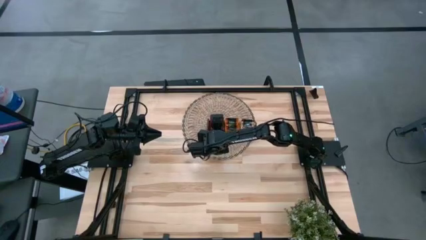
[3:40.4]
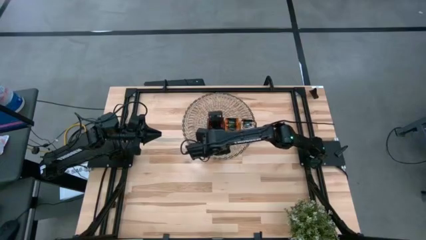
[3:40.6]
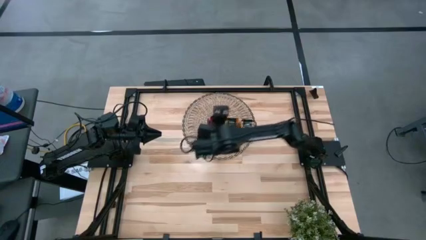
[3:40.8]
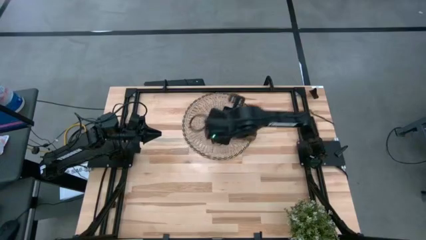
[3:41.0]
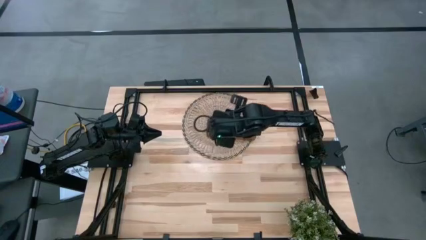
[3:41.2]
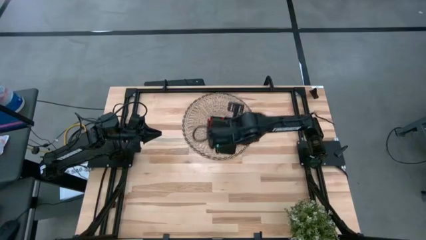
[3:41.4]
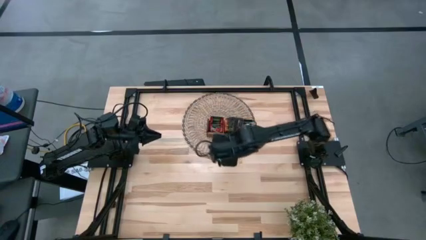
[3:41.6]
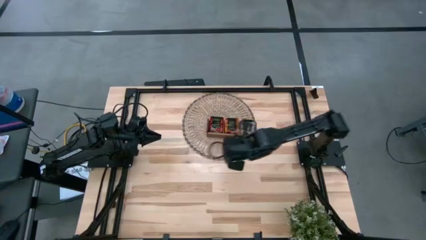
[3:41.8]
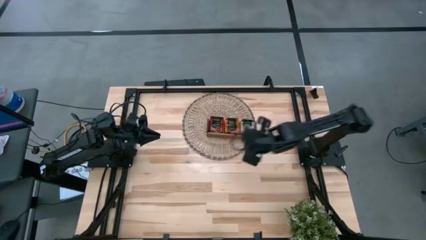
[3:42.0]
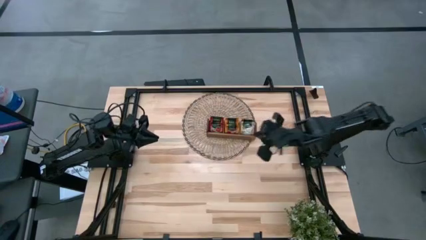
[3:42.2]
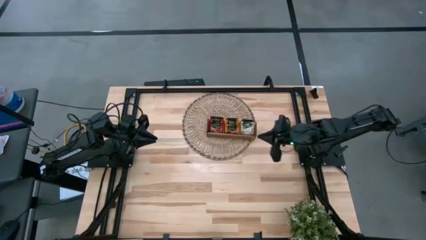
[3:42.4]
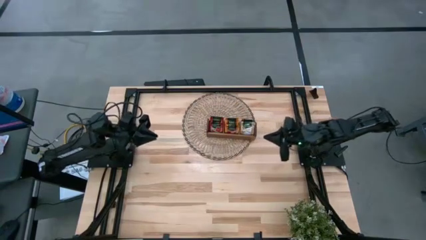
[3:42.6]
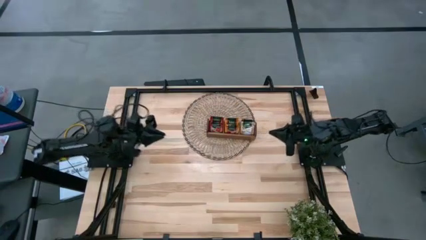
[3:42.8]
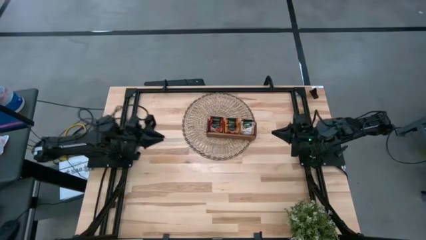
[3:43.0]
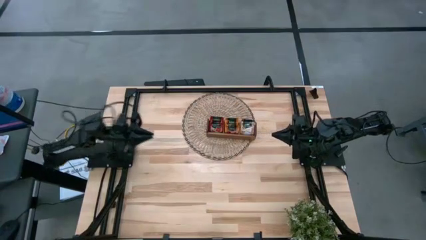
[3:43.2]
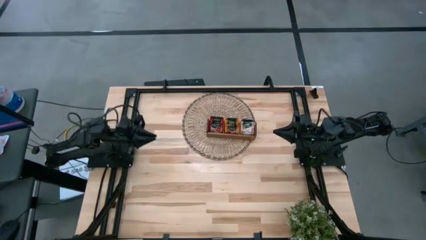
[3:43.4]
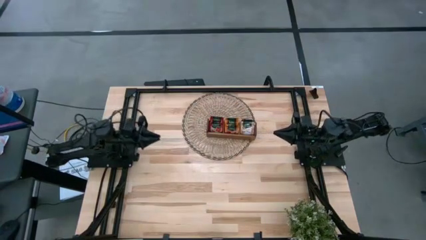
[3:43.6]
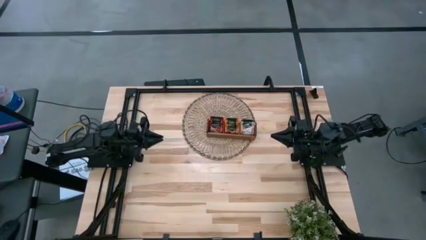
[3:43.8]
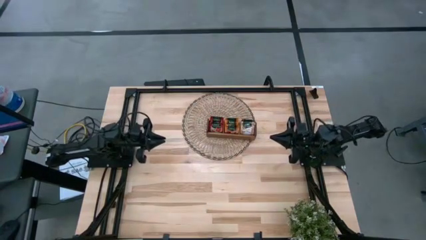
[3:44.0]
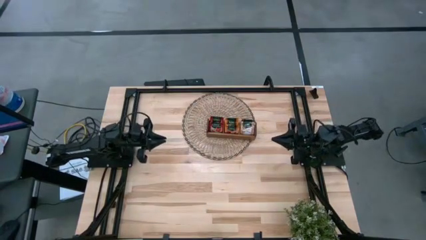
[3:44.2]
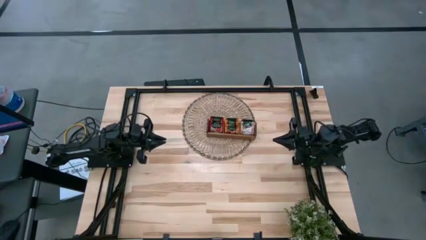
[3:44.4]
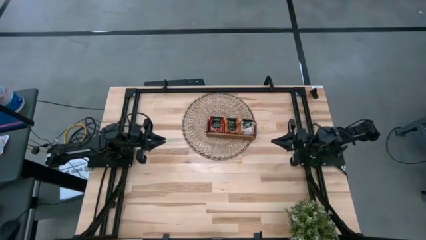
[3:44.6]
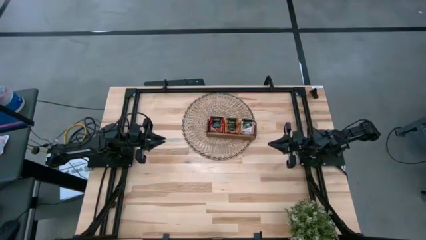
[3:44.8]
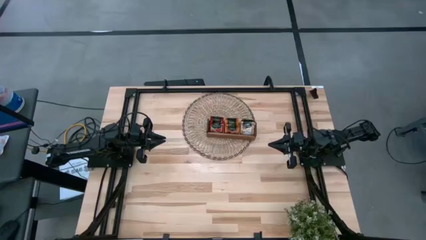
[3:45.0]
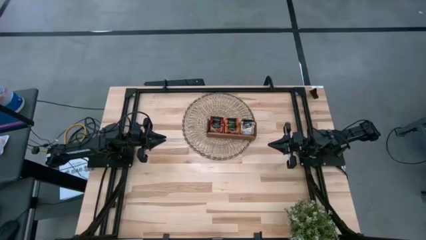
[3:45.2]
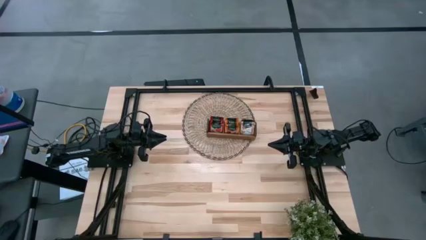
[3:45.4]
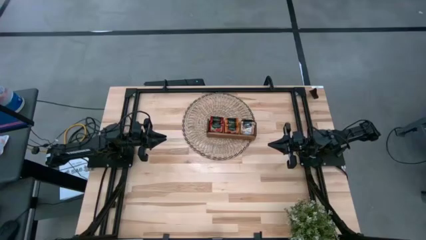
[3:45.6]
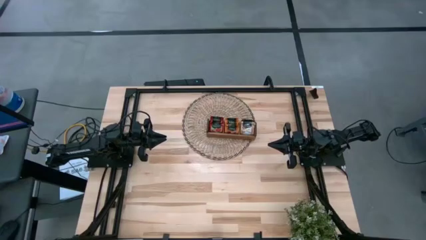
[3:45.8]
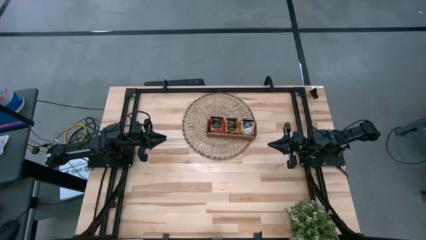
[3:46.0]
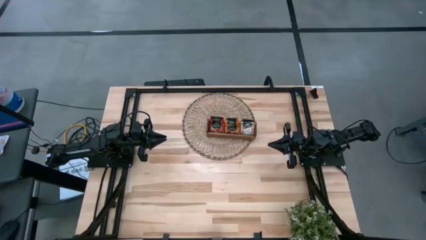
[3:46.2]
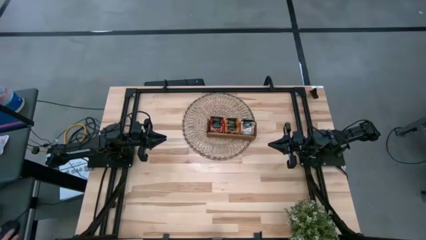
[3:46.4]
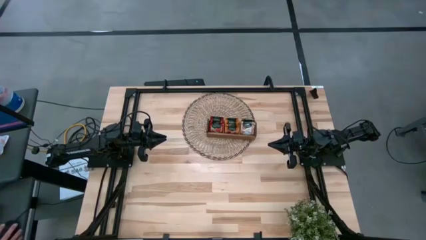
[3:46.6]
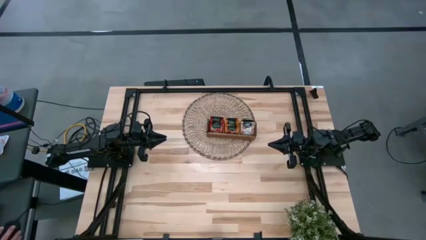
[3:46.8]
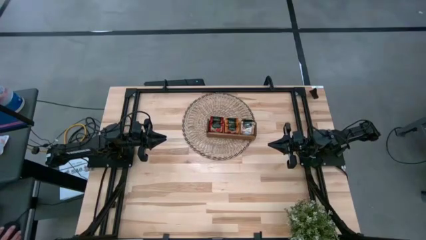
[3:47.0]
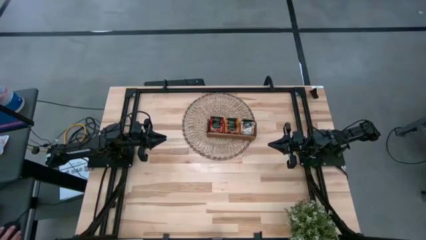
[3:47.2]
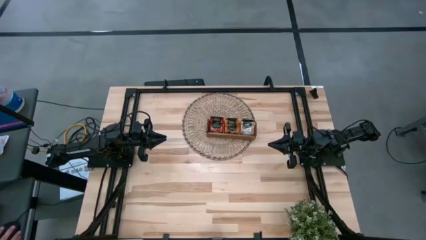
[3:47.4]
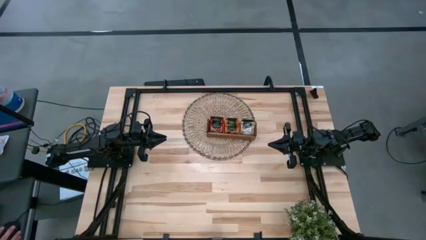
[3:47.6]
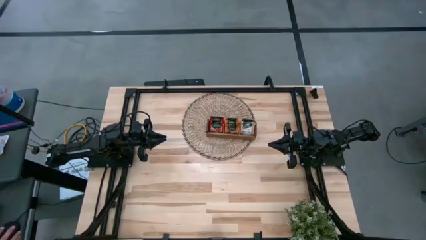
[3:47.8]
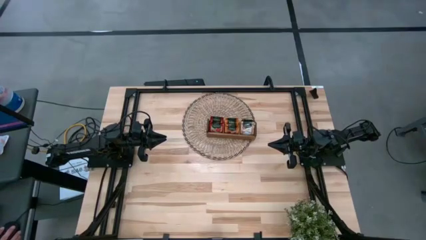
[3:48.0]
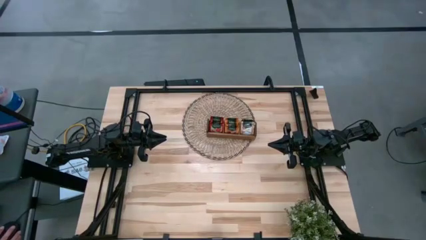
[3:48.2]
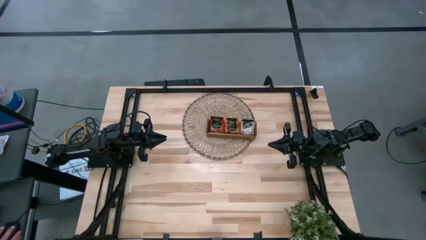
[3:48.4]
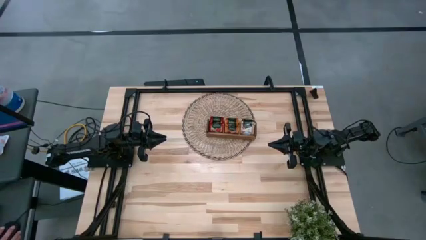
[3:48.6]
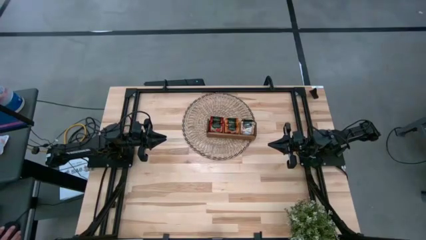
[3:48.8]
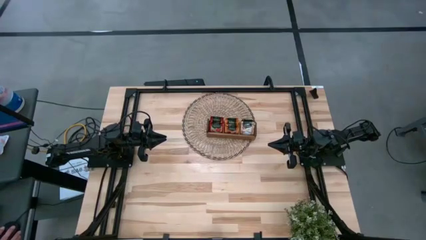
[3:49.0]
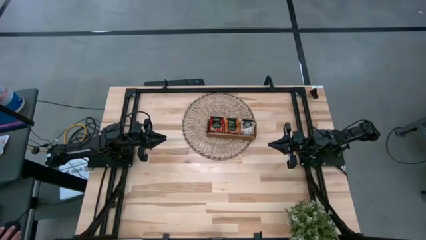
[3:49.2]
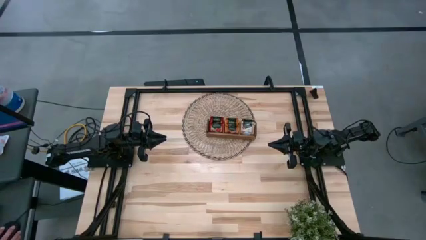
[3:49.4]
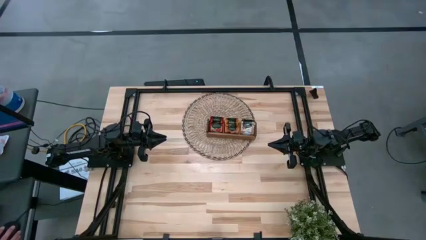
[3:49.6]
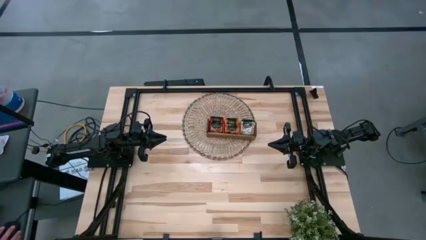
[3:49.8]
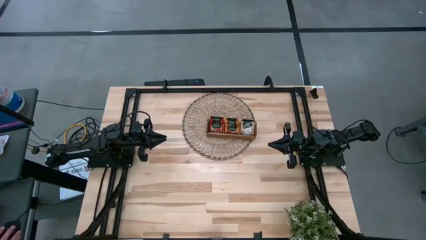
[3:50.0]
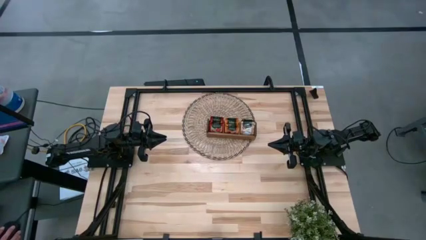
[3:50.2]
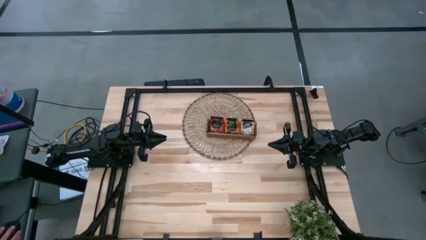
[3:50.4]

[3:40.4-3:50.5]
Task: Pick & Place Tea
Return to Home Position
